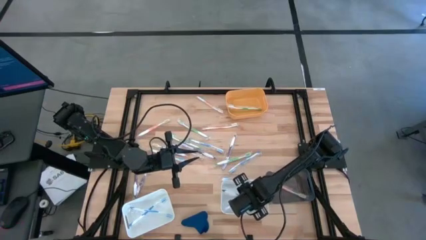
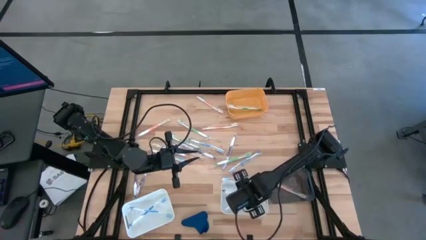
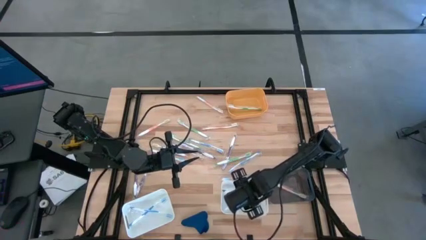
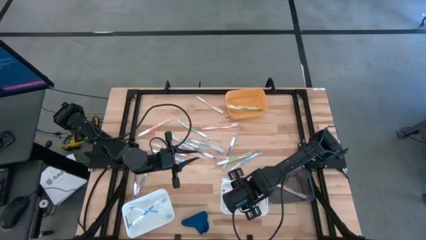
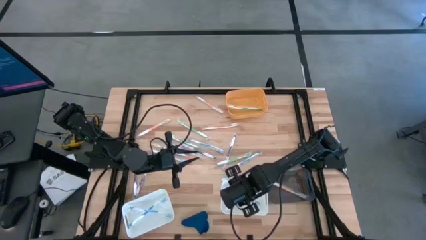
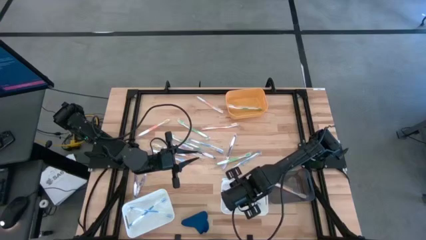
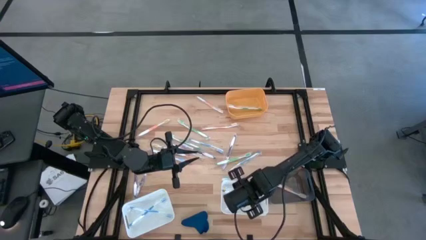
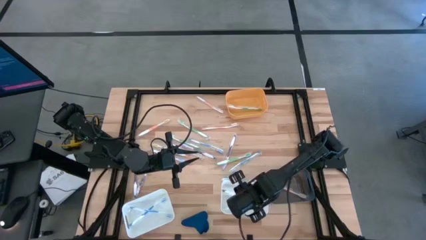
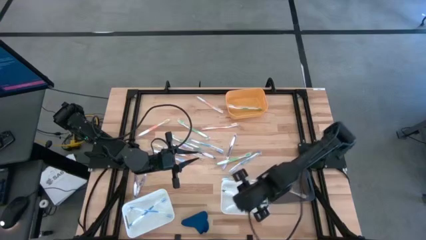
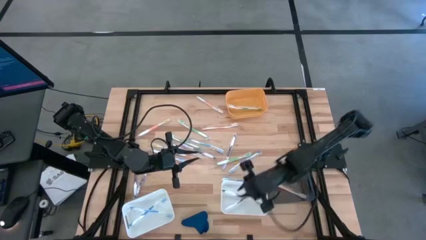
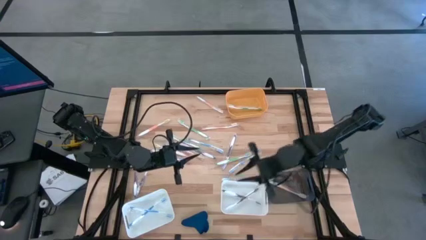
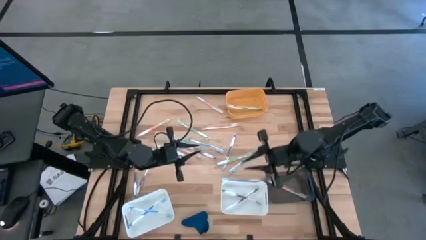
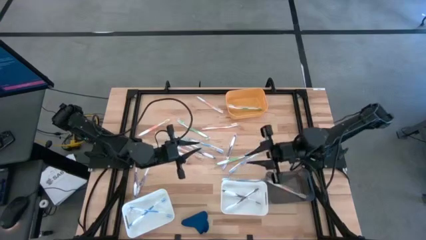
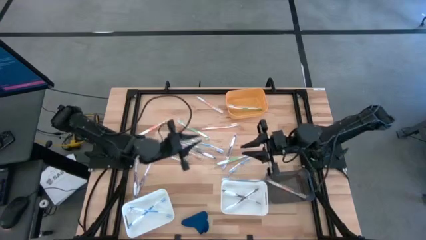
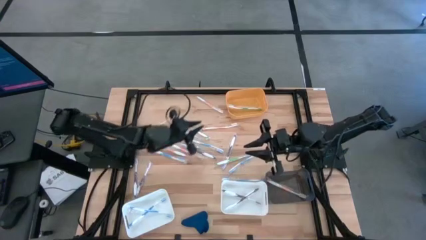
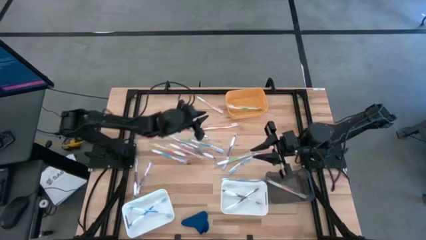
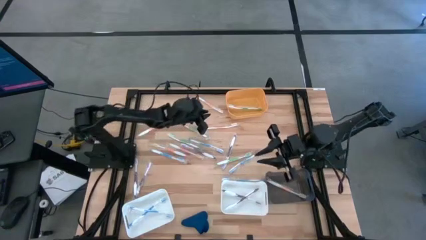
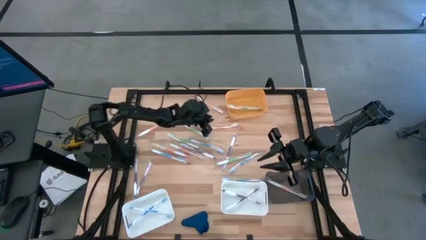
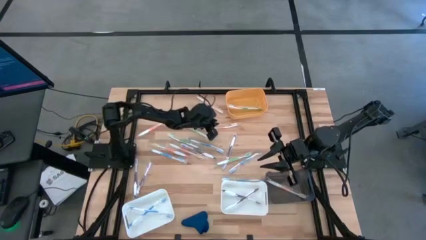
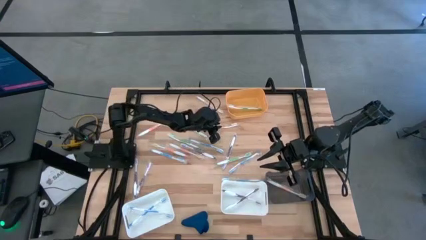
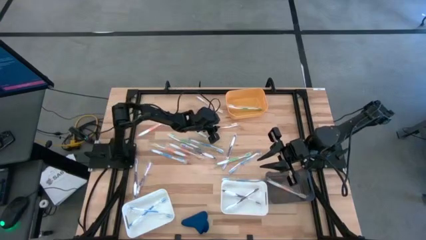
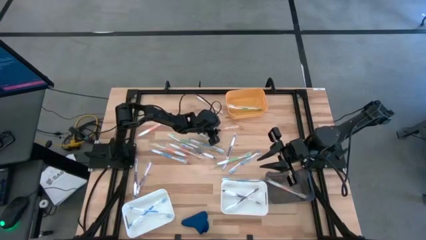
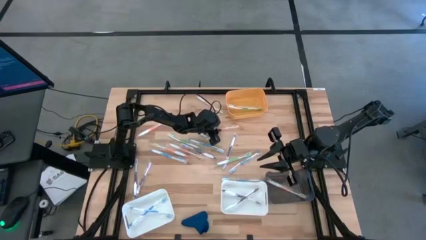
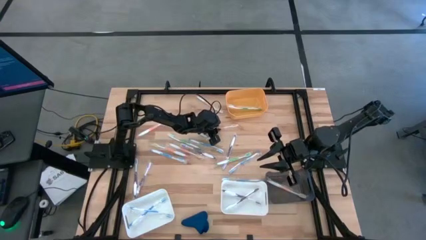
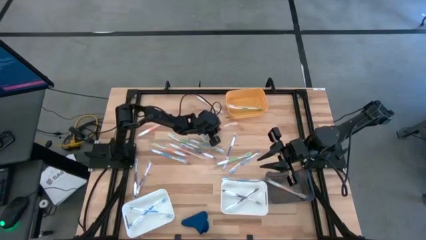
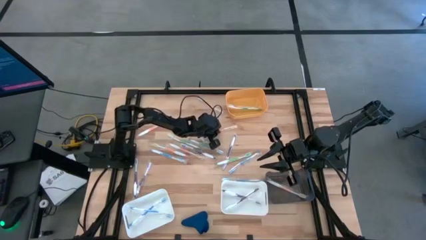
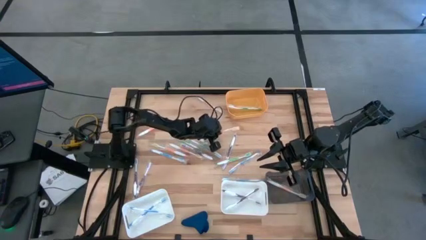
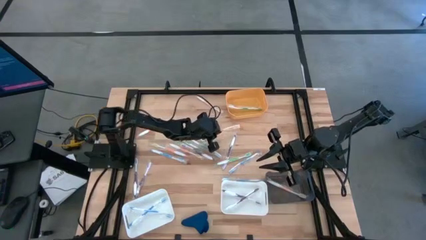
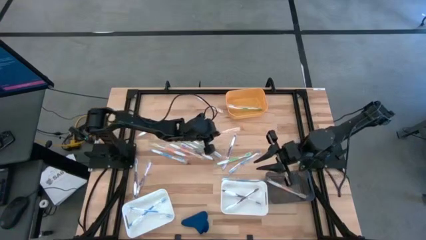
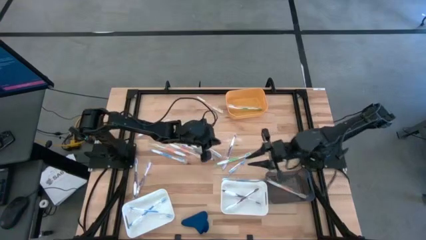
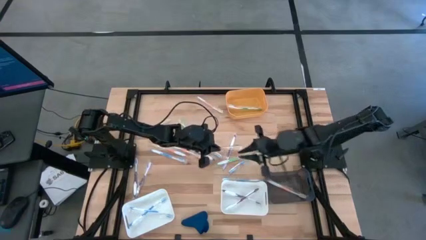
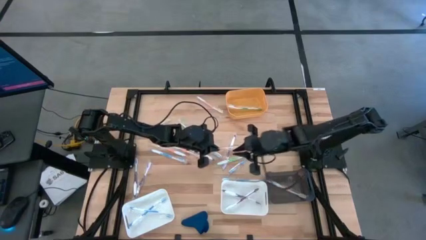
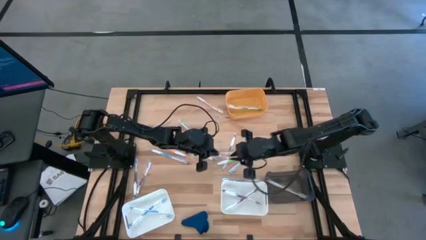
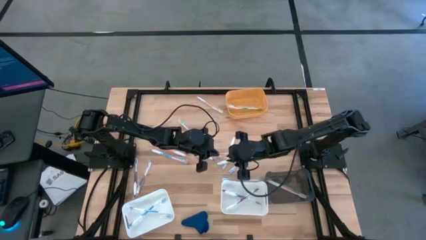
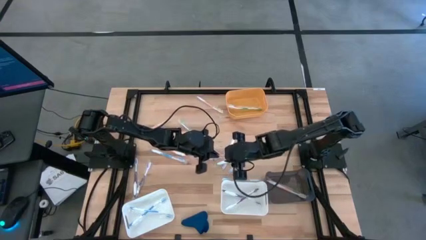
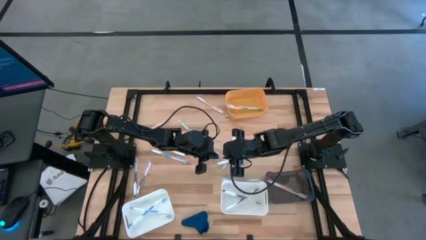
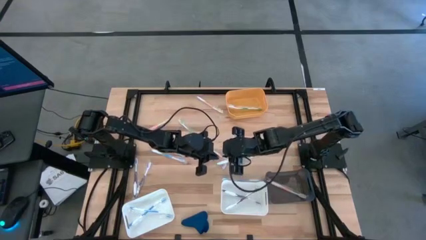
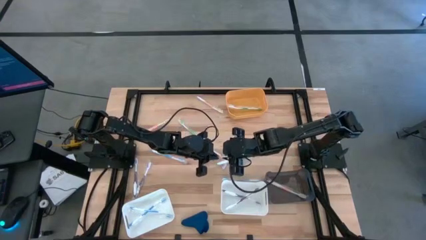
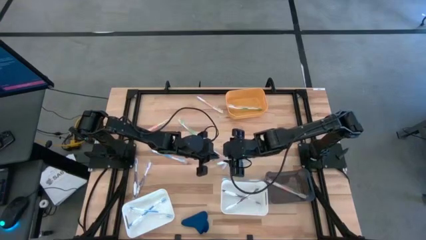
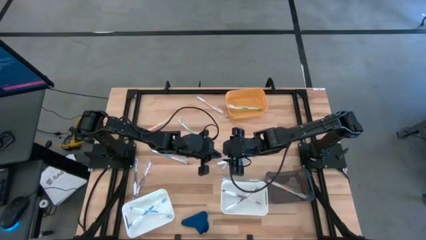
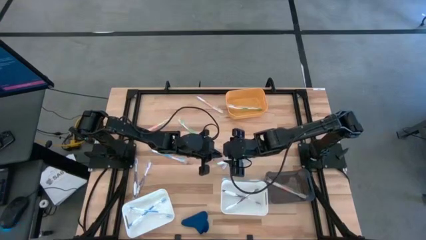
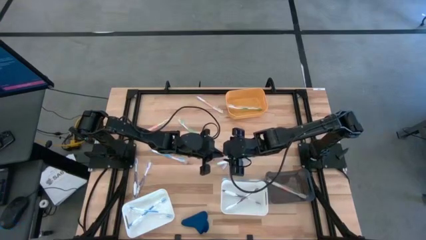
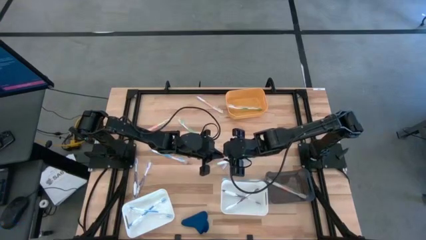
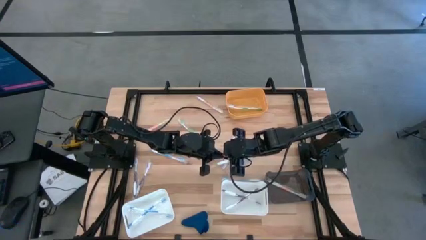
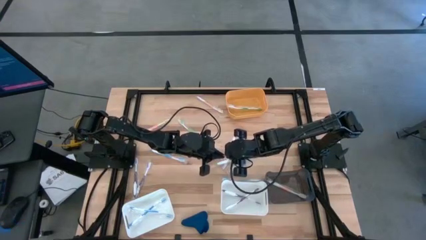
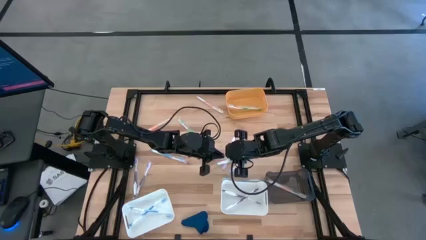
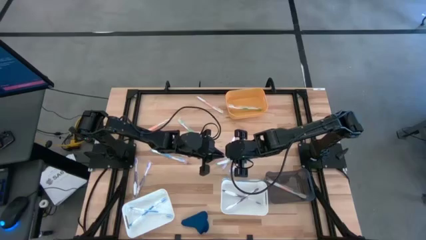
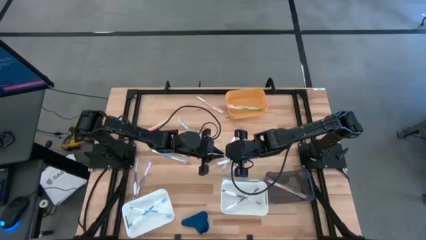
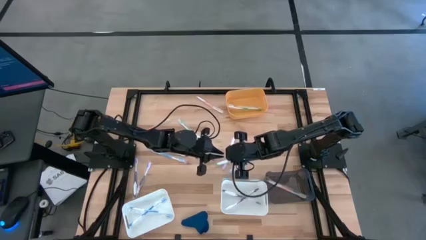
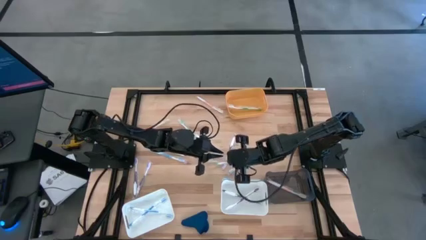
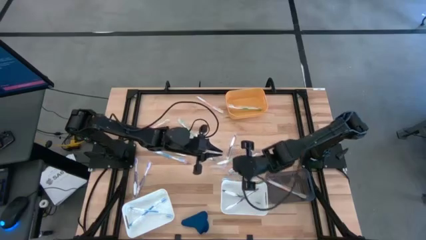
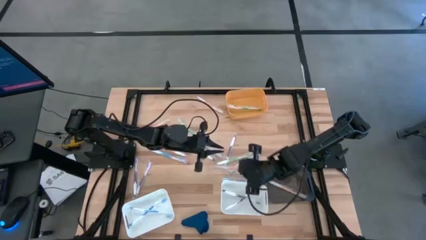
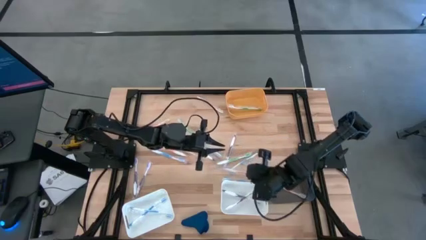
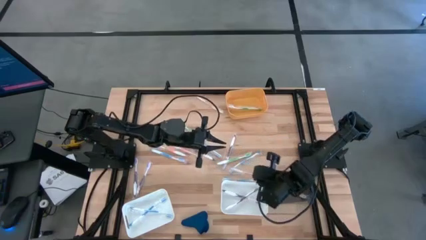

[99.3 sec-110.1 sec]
Task: Pick & Place Toothbrushes
Put the orange toothbrush into the black bin

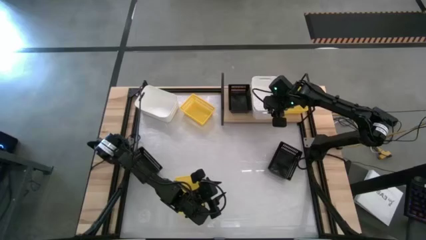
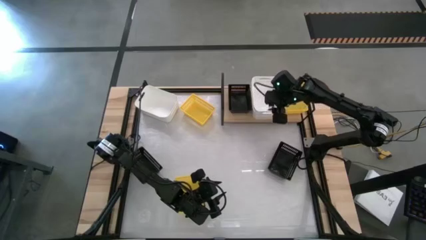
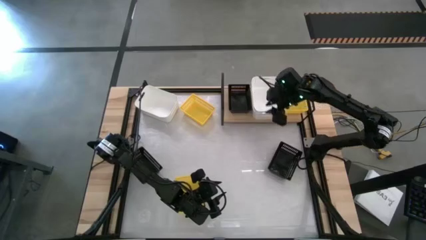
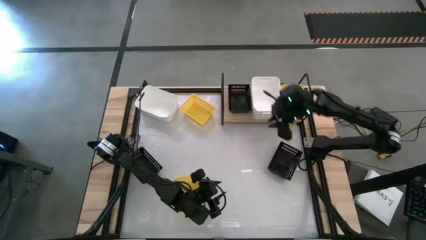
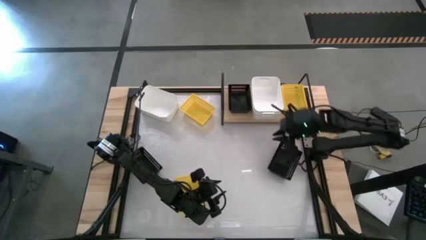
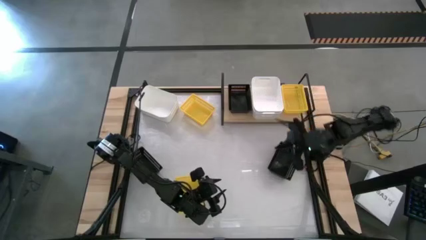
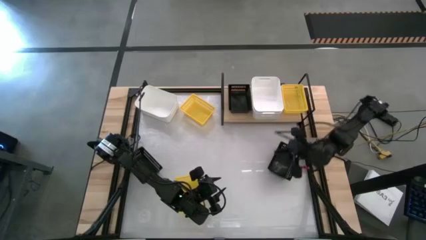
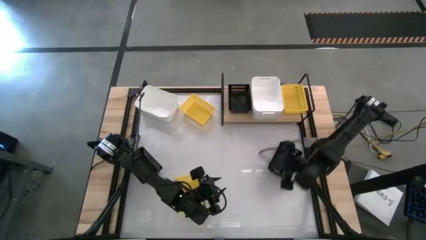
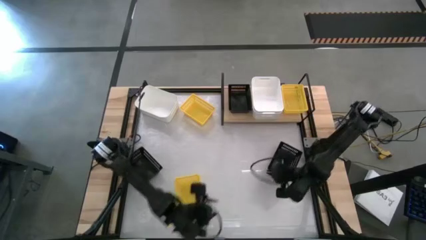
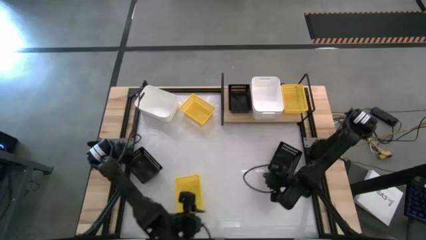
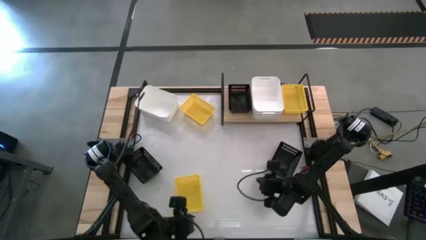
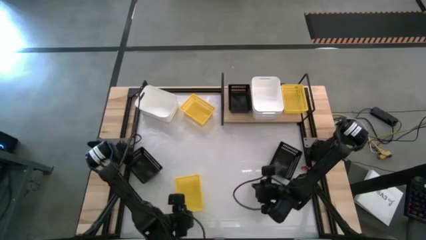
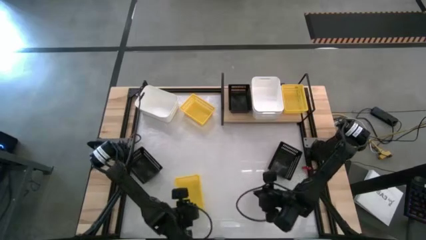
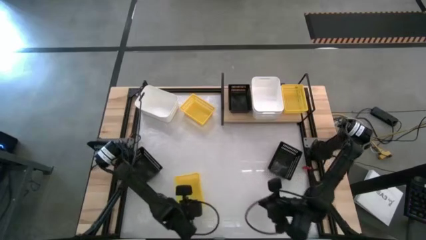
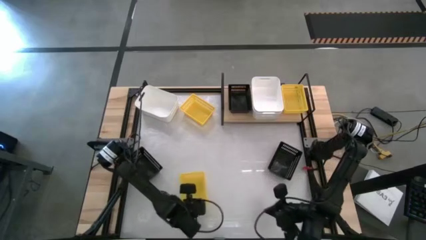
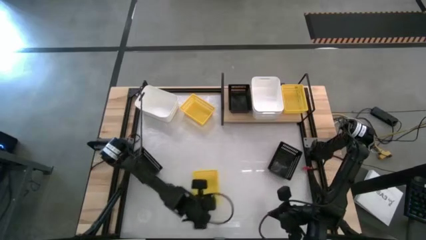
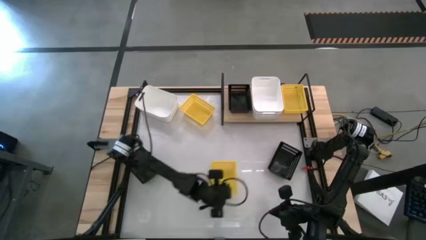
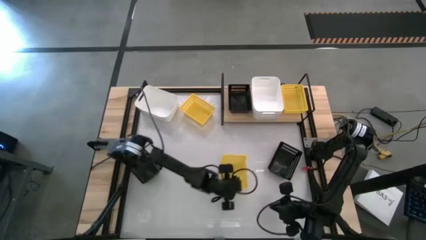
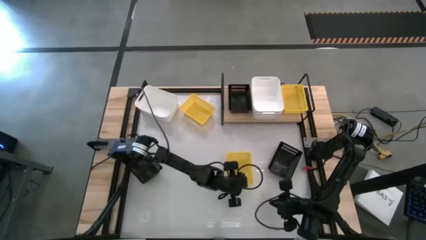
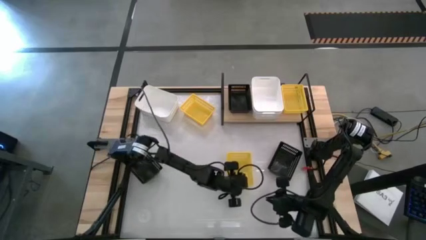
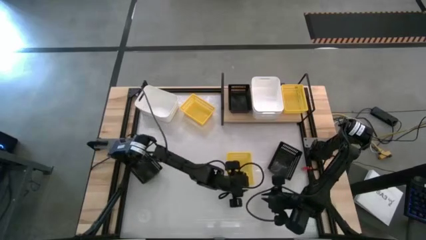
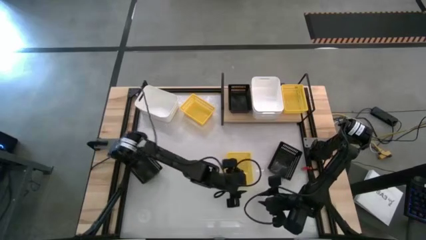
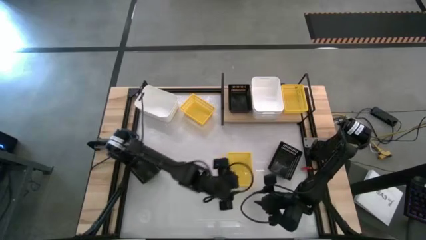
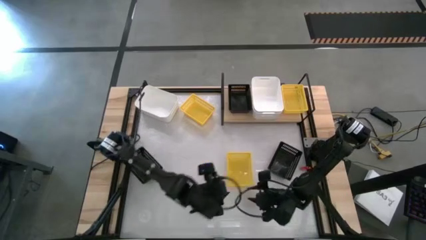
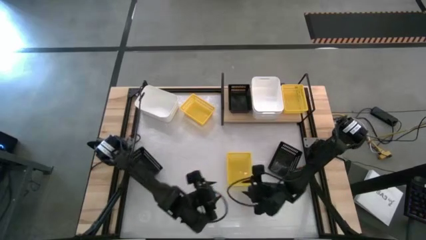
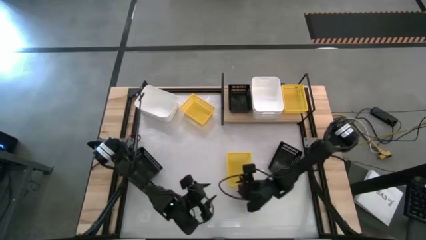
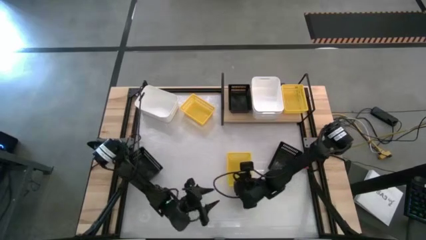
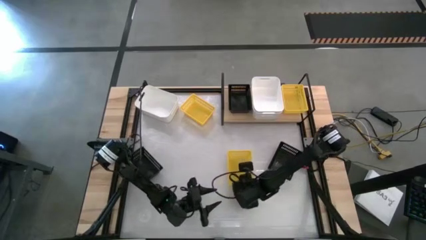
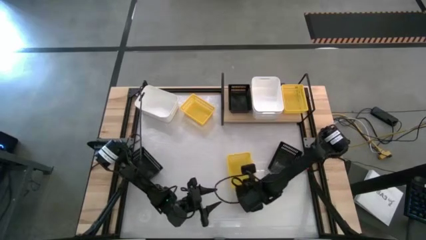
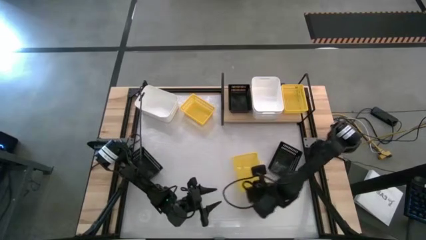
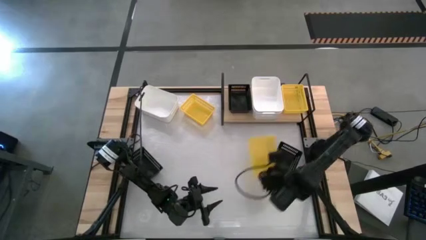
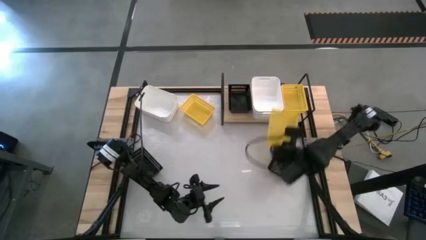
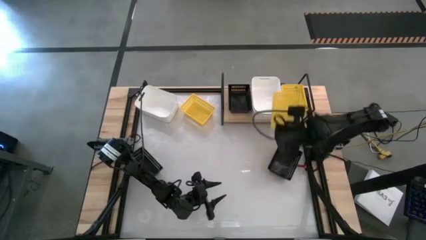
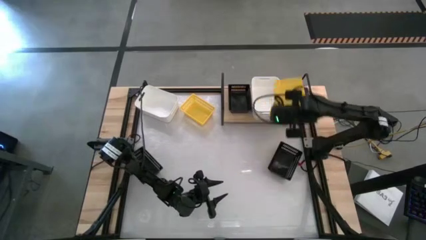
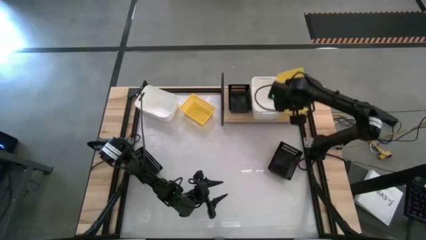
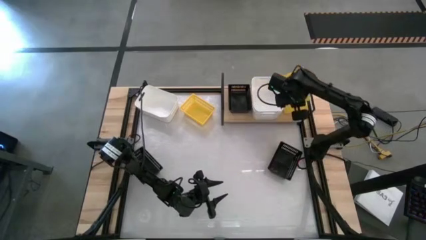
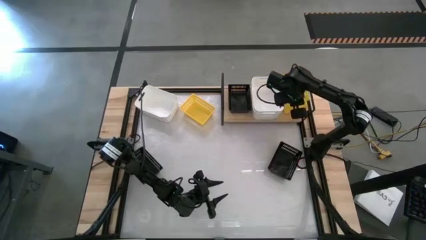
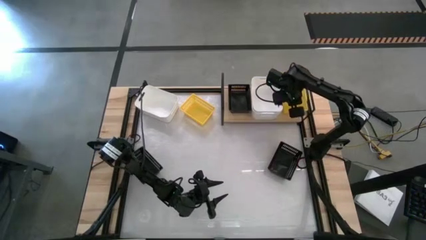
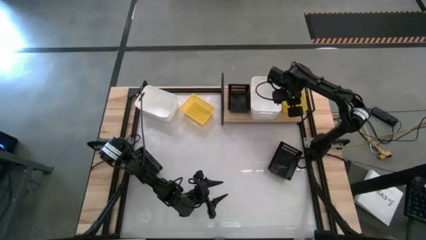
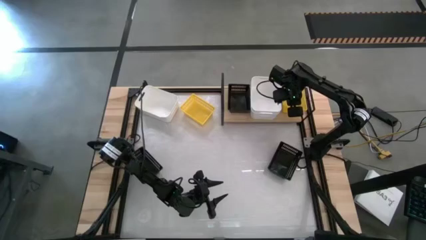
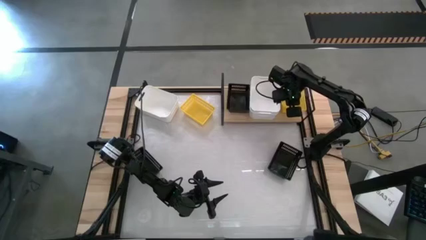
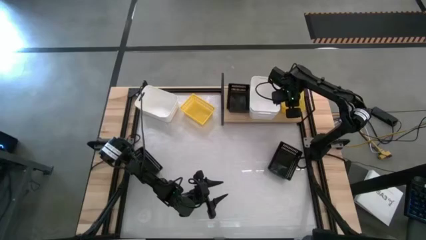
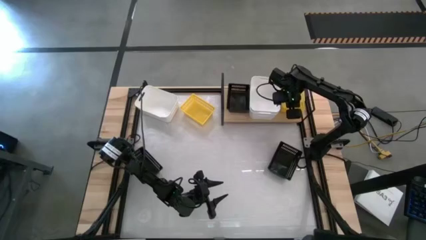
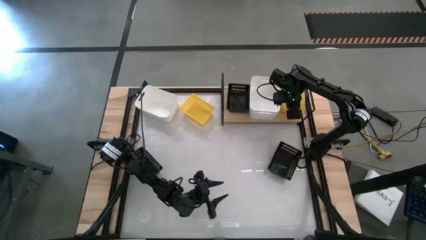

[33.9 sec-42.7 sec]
Task: Stack baskets on shelf by color
Stack the bottom yellow bin into the yellow bin on the shelf
